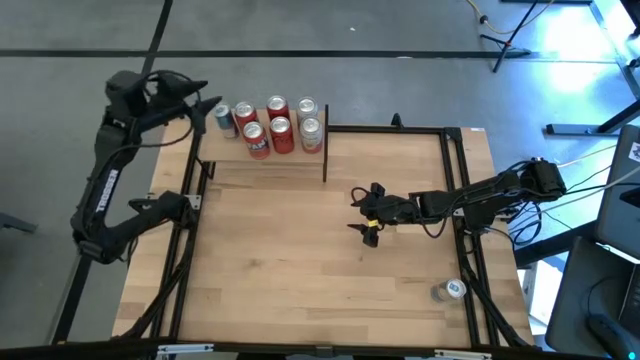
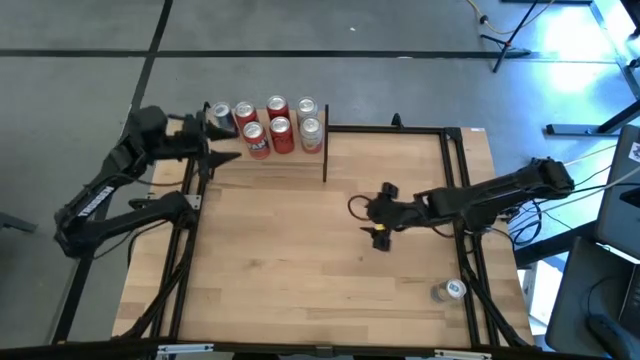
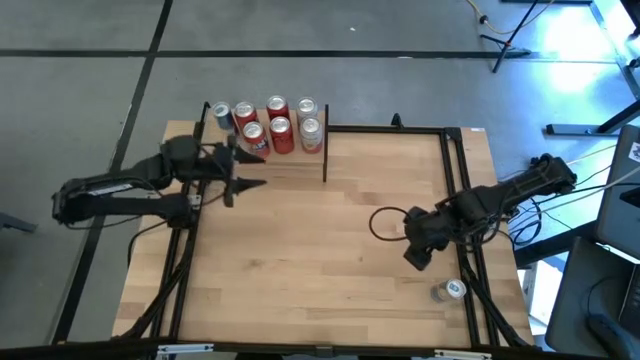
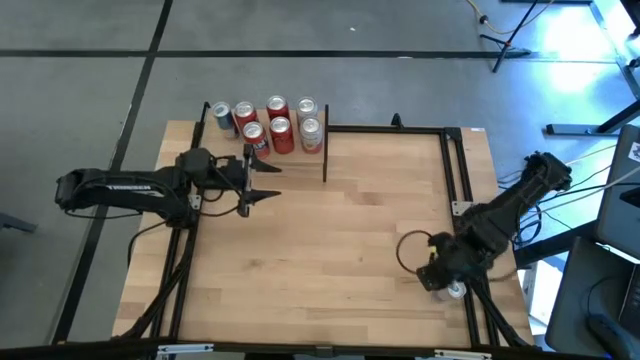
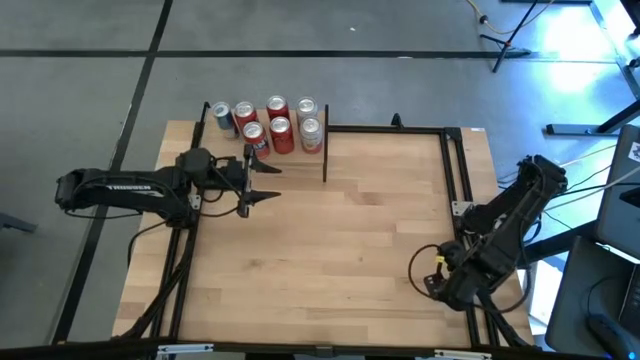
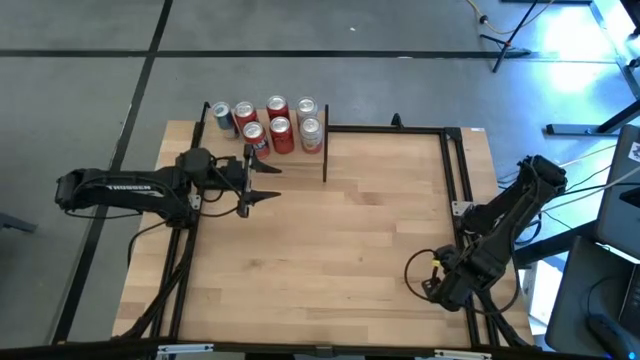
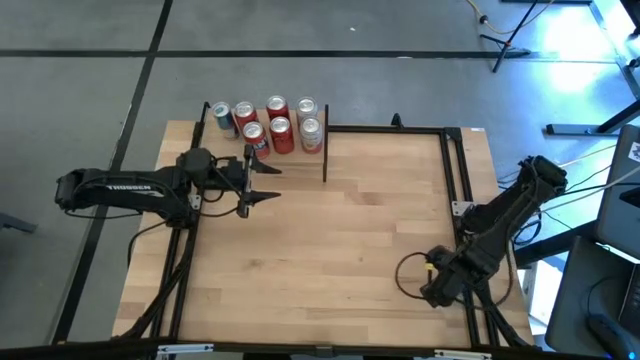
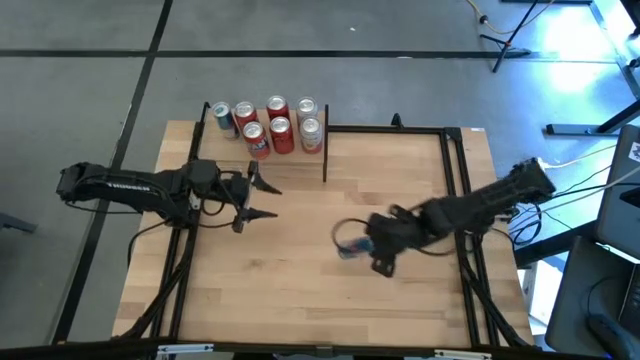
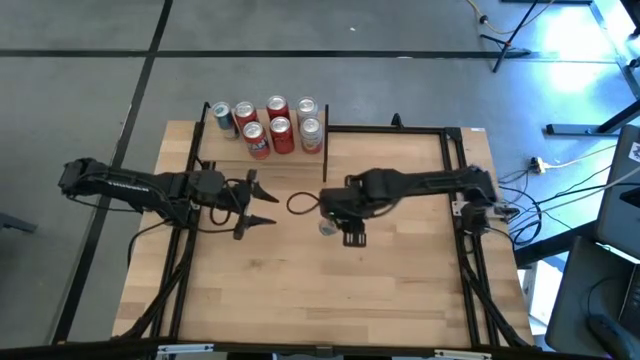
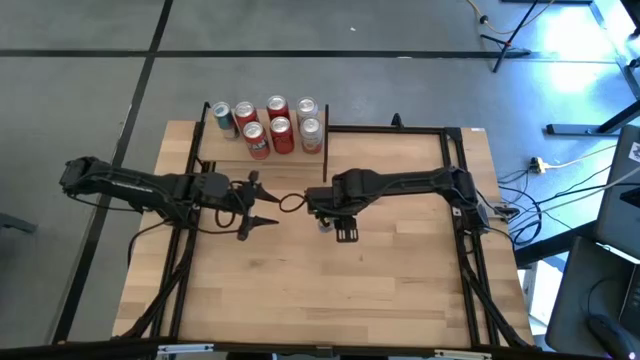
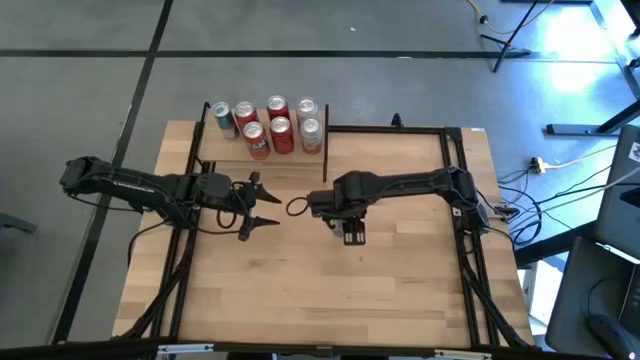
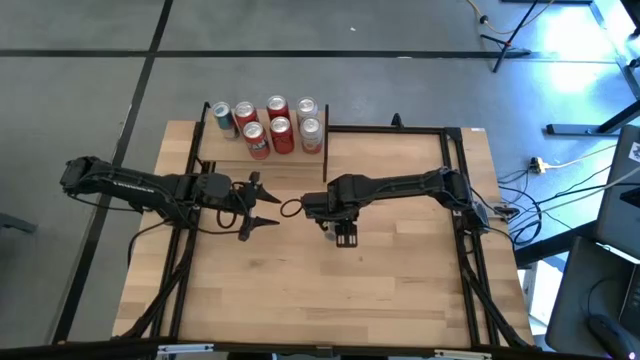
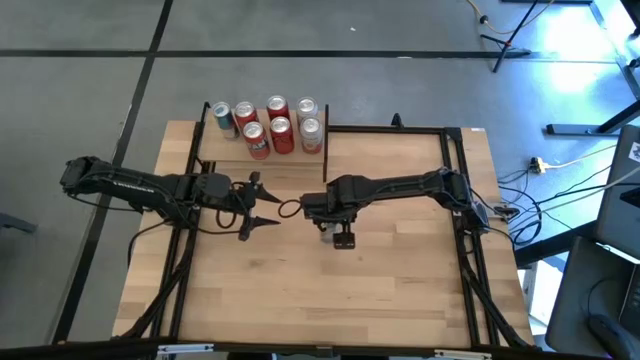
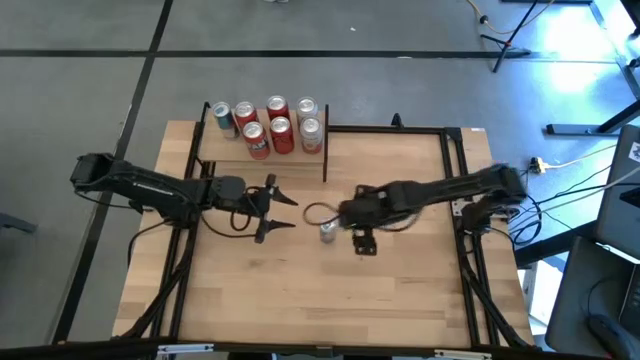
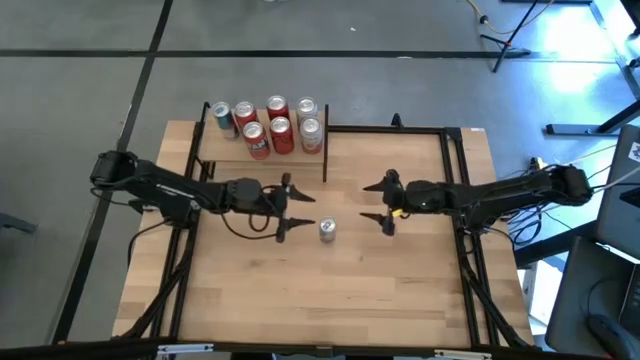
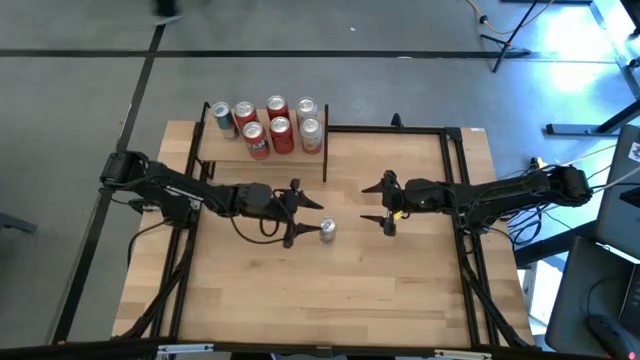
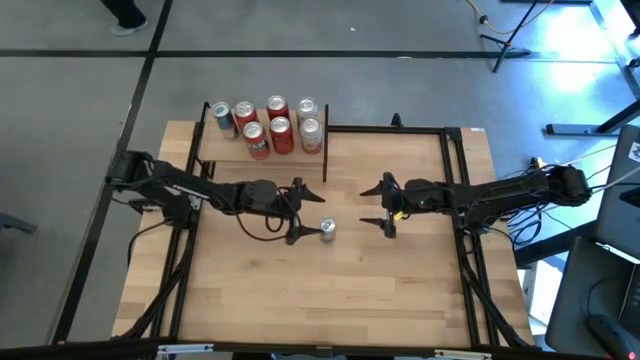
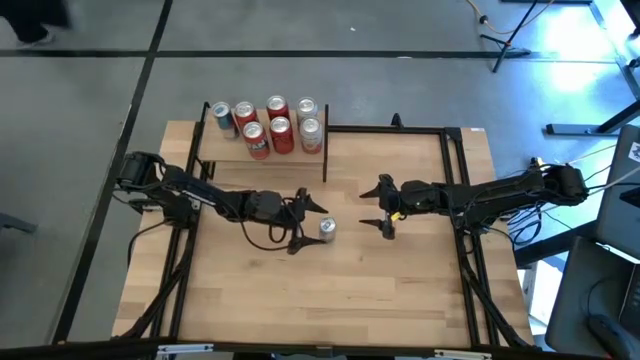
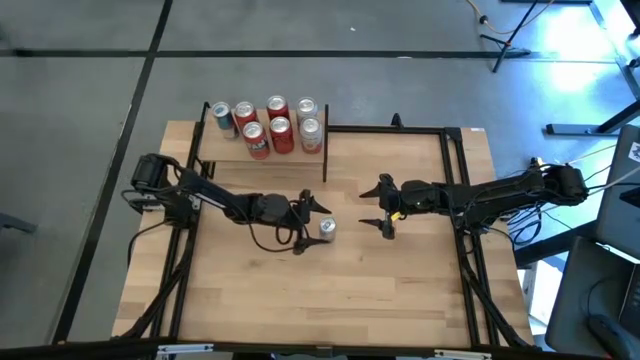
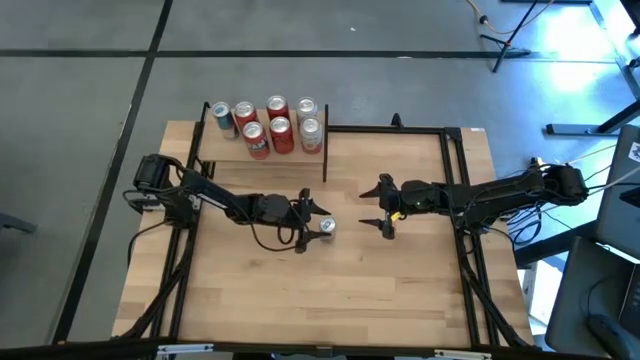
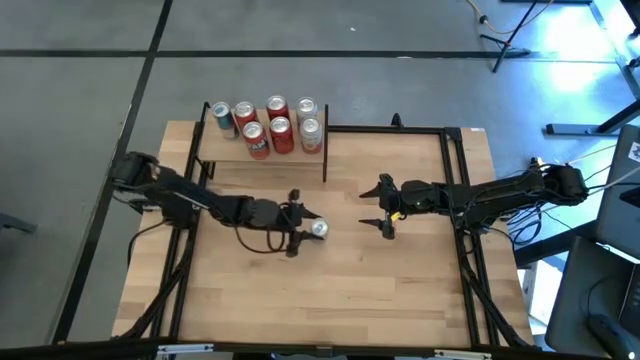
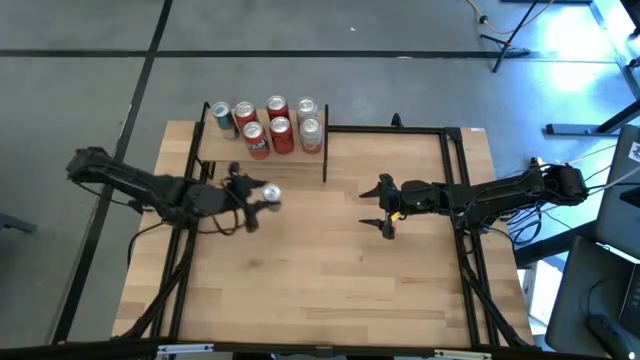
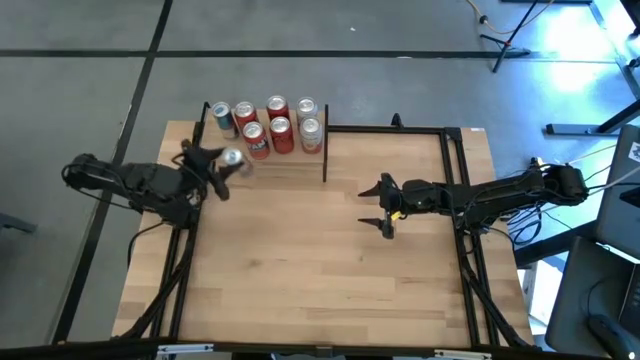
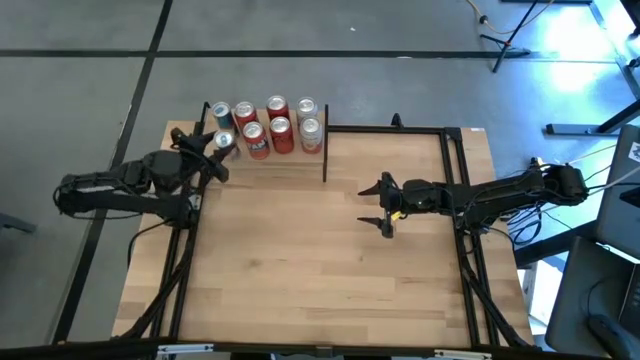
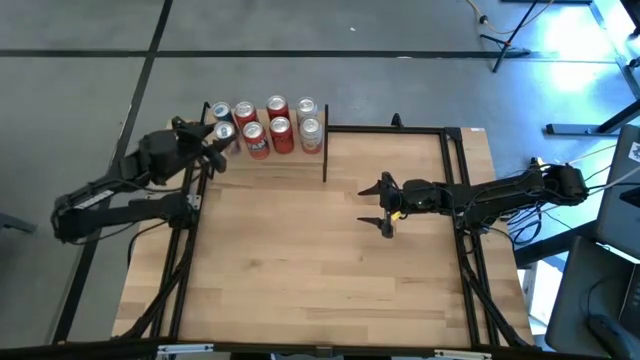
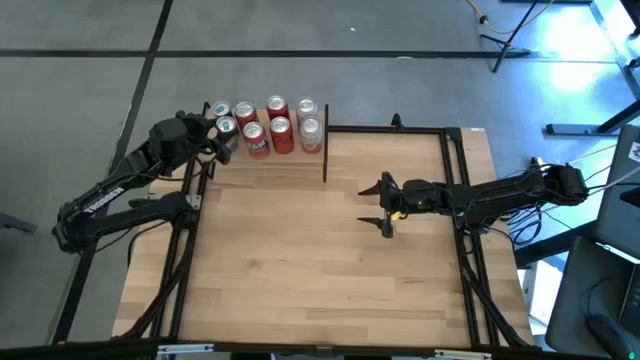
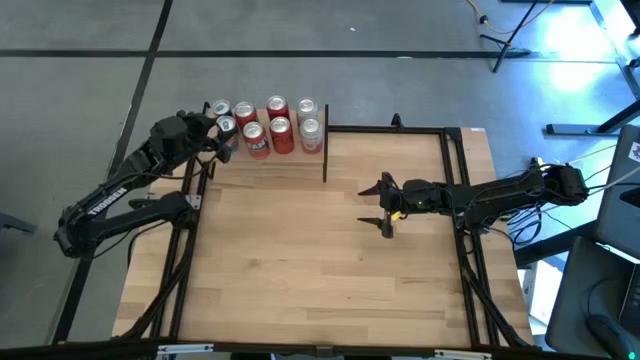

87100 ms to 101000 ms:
Task: Place canned beverage on shelf
Put the blue soda can aligned with the other blue soda can on the shelf

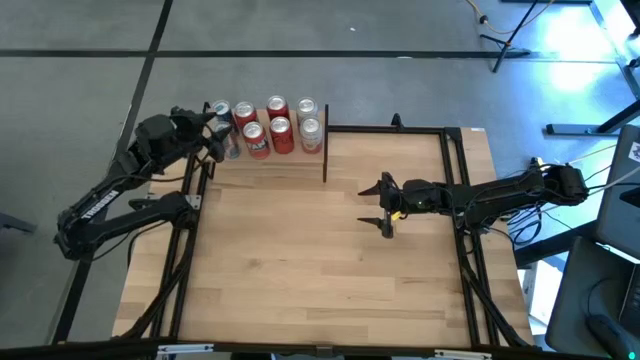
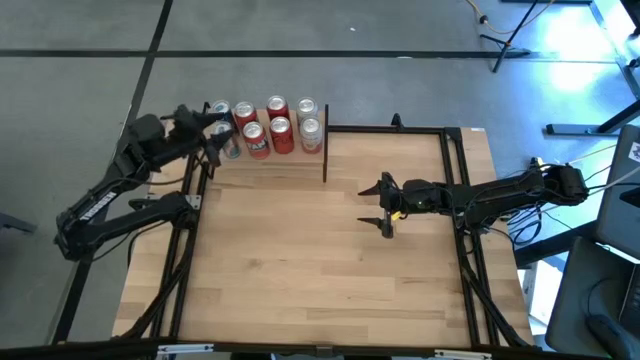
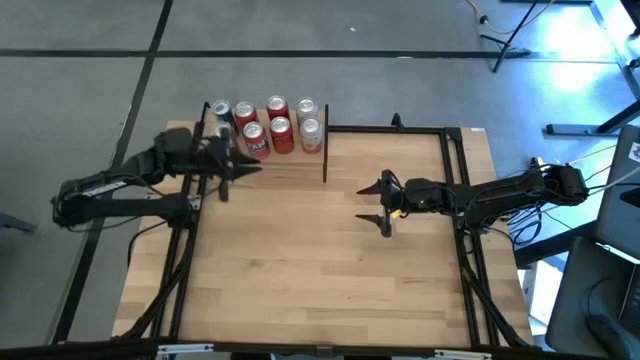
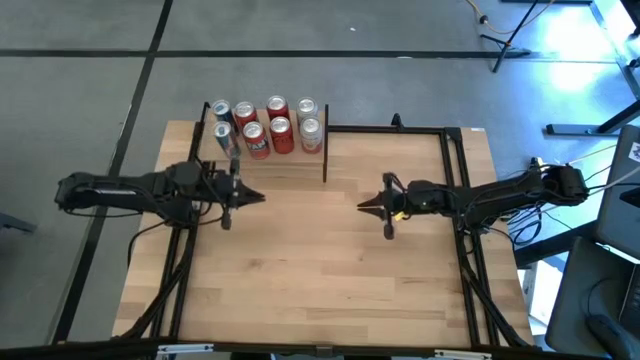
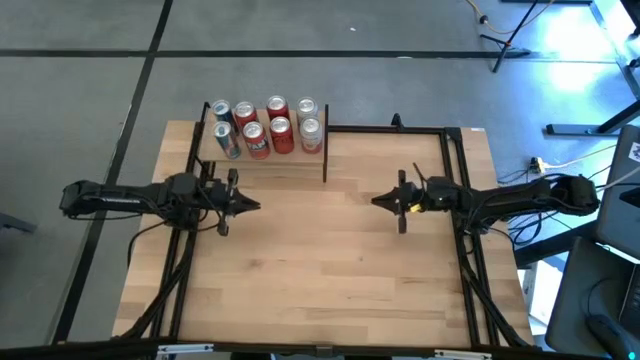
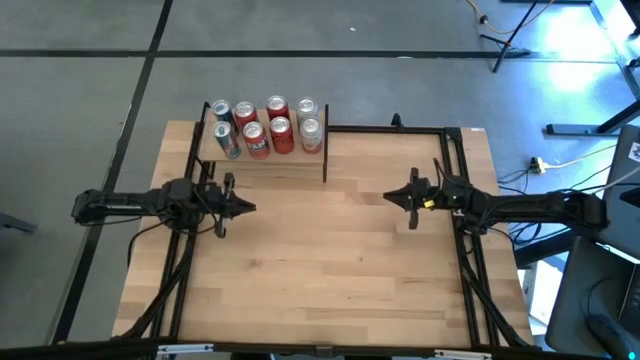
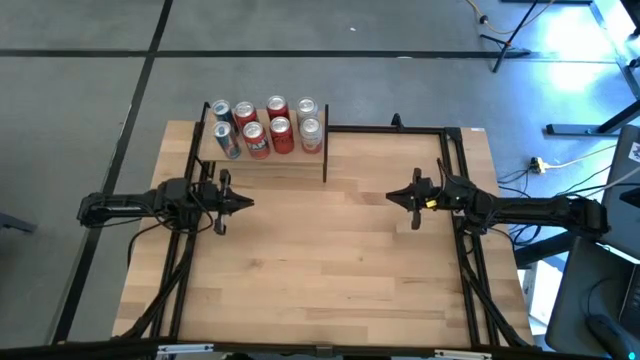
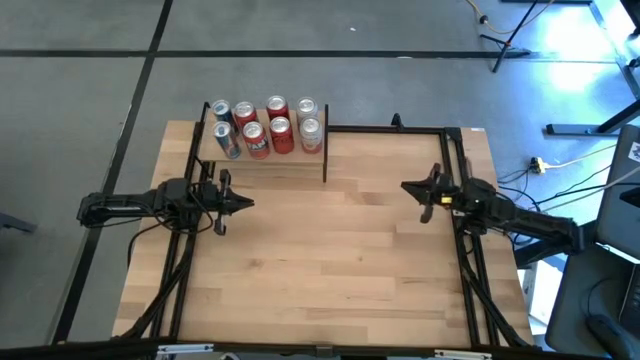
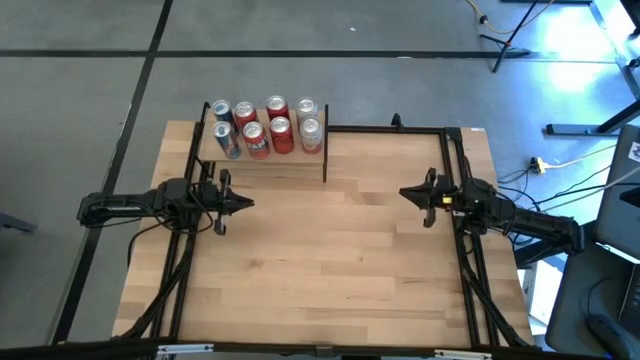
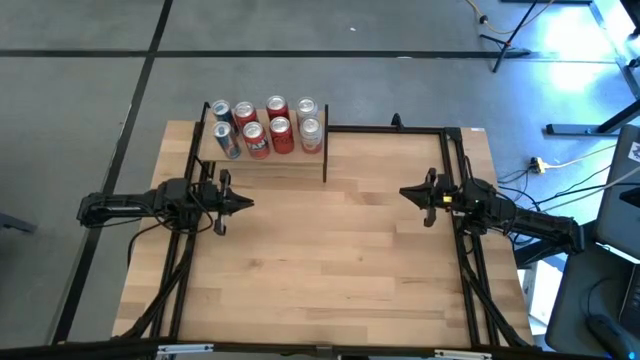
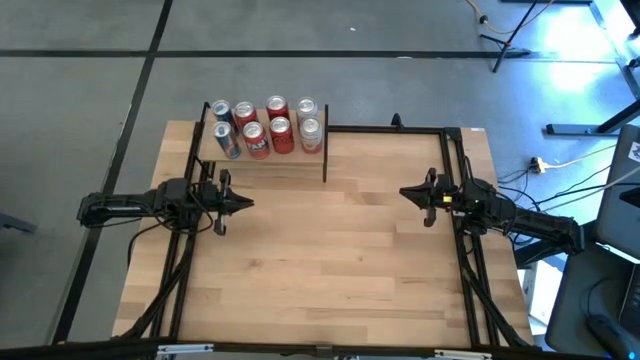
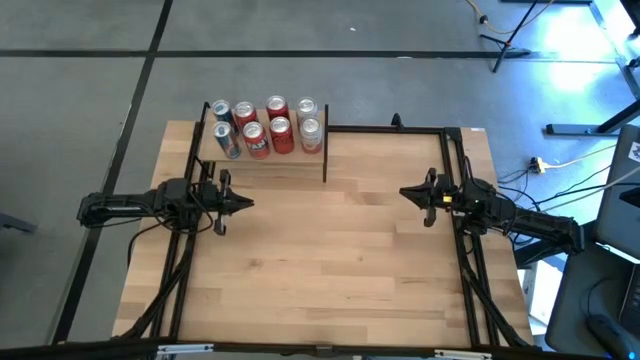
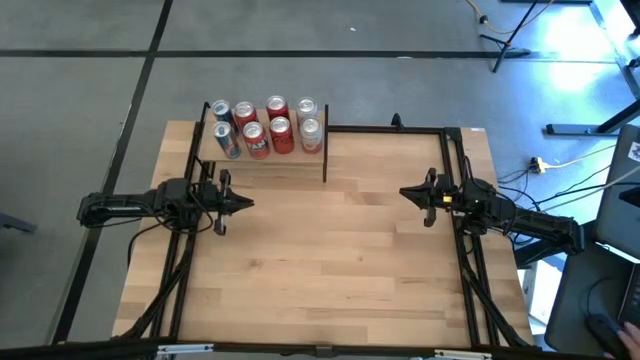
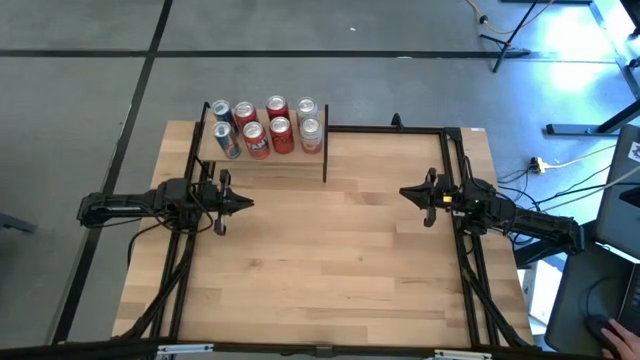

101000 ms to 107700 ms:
Return to Home Position
